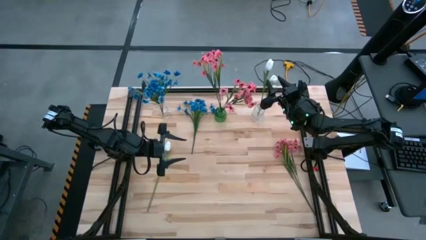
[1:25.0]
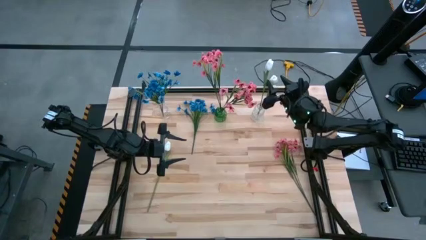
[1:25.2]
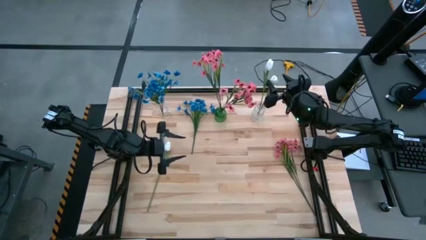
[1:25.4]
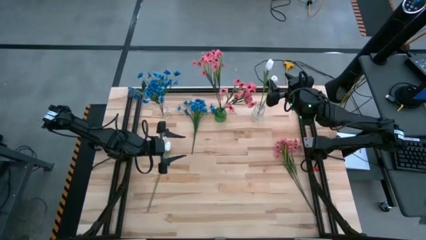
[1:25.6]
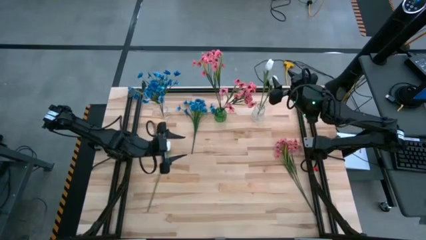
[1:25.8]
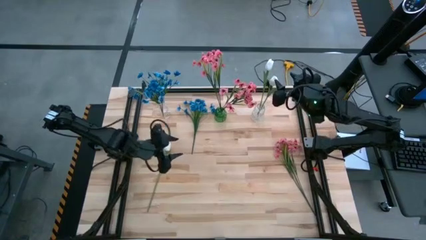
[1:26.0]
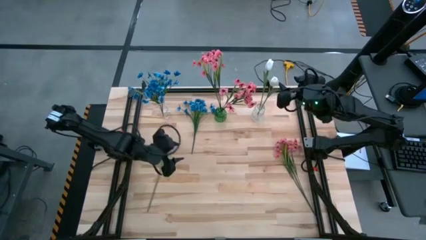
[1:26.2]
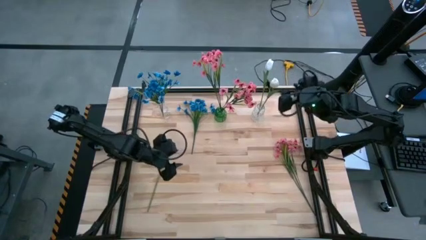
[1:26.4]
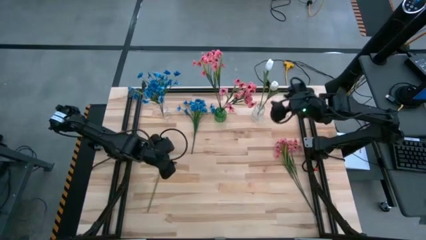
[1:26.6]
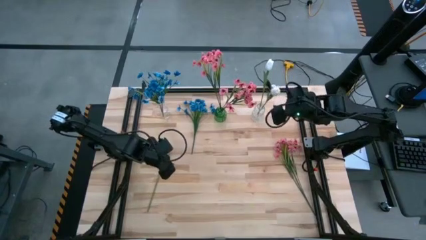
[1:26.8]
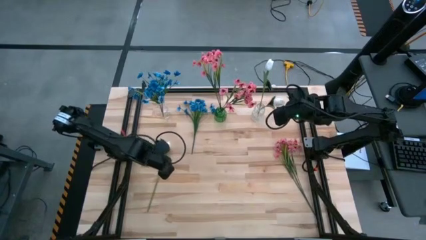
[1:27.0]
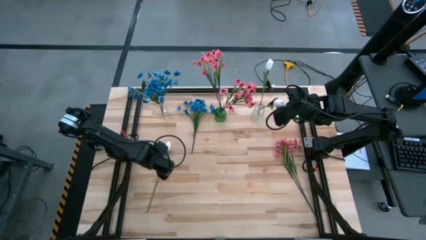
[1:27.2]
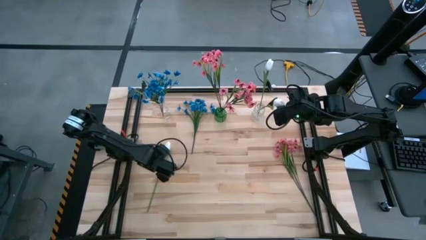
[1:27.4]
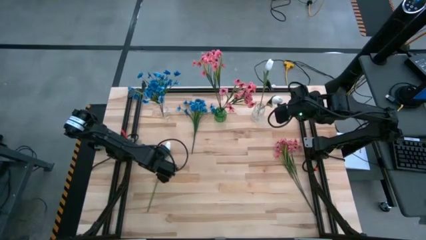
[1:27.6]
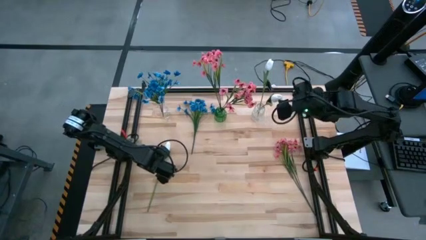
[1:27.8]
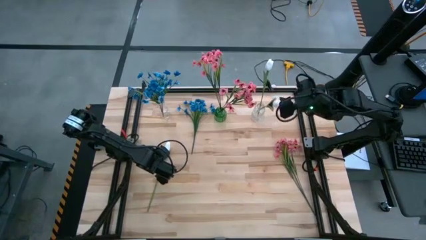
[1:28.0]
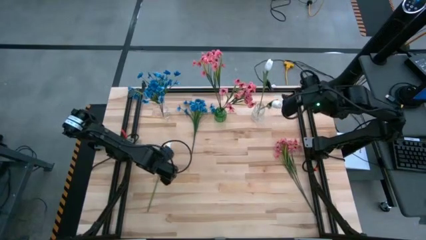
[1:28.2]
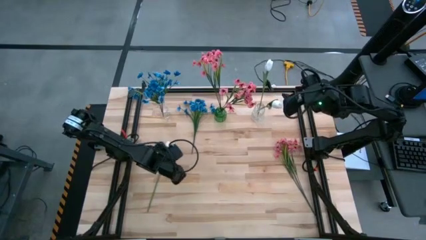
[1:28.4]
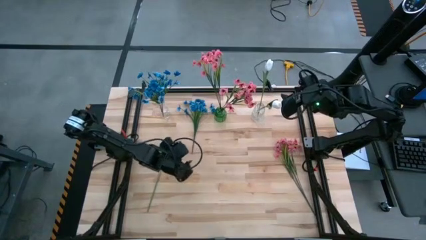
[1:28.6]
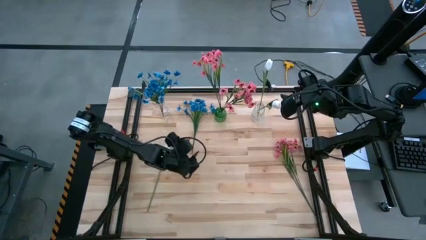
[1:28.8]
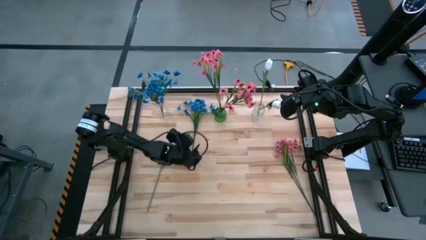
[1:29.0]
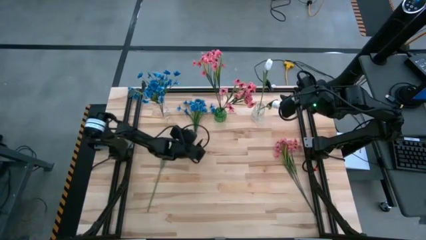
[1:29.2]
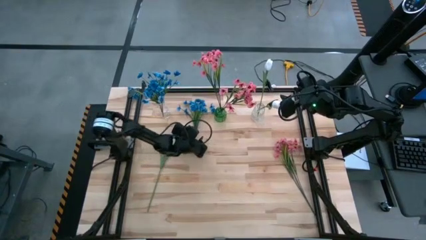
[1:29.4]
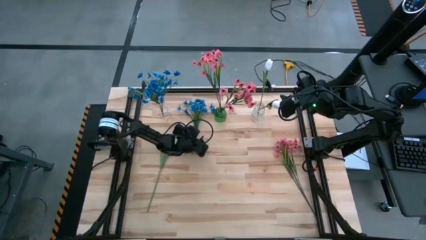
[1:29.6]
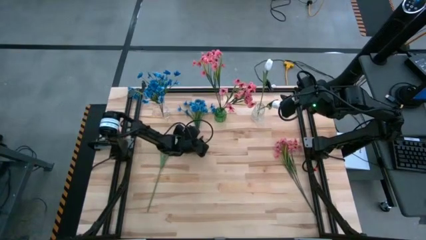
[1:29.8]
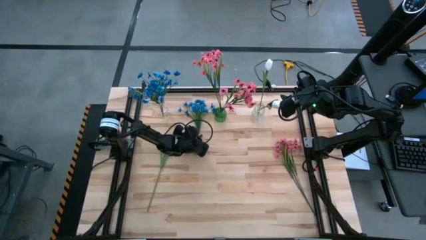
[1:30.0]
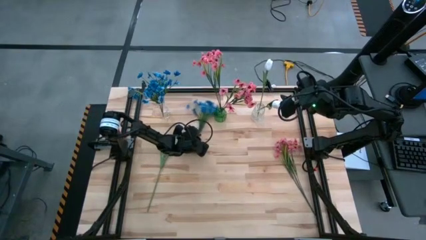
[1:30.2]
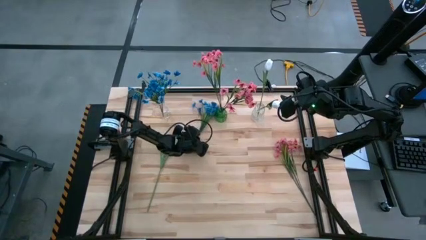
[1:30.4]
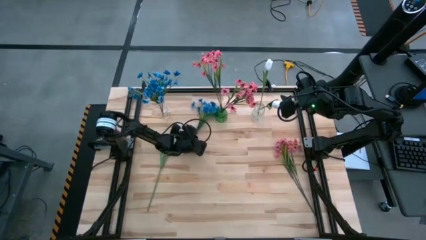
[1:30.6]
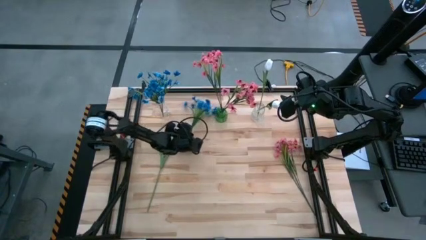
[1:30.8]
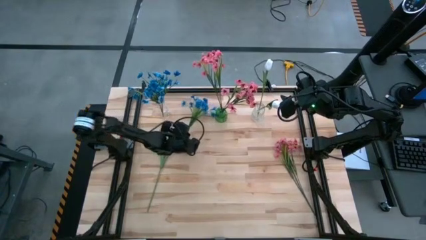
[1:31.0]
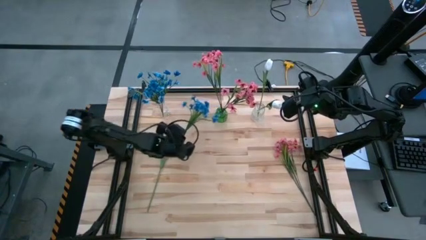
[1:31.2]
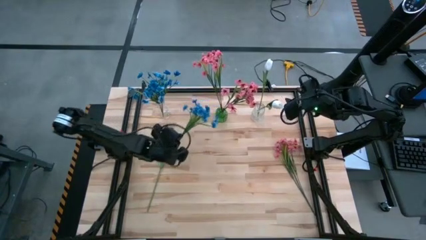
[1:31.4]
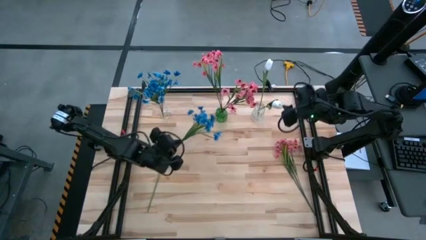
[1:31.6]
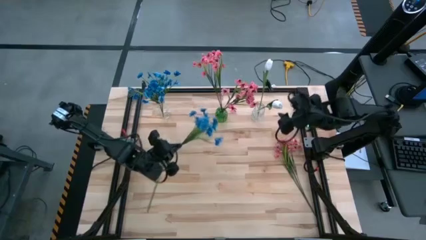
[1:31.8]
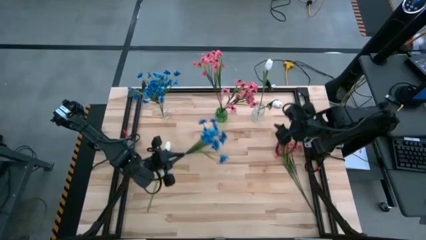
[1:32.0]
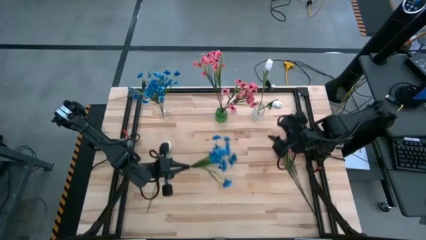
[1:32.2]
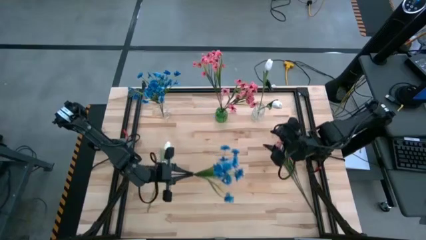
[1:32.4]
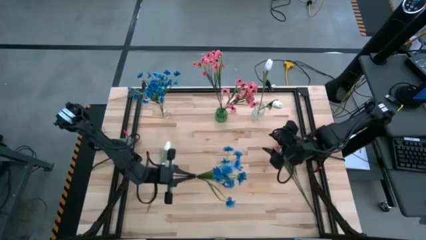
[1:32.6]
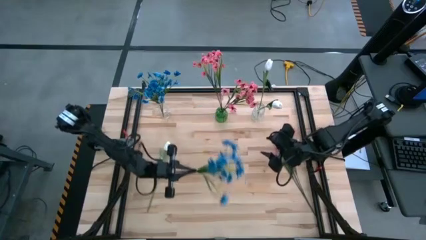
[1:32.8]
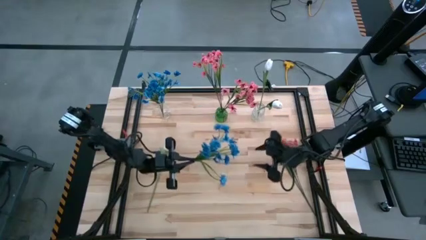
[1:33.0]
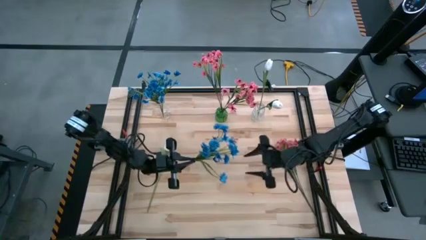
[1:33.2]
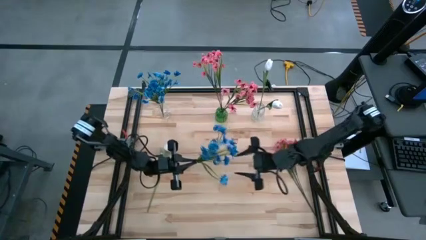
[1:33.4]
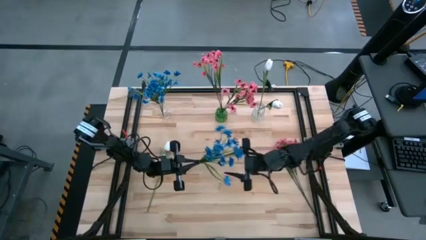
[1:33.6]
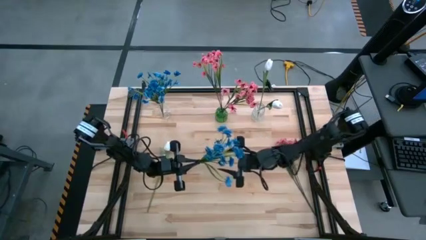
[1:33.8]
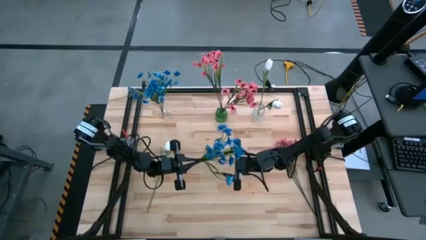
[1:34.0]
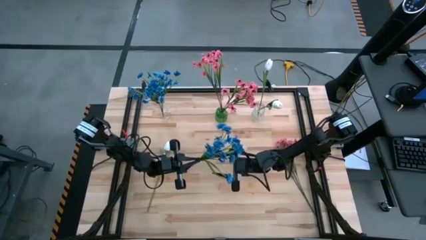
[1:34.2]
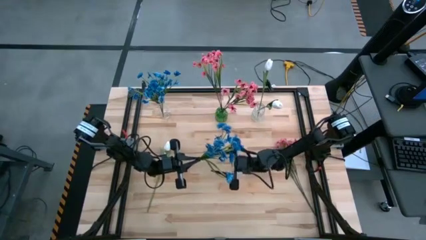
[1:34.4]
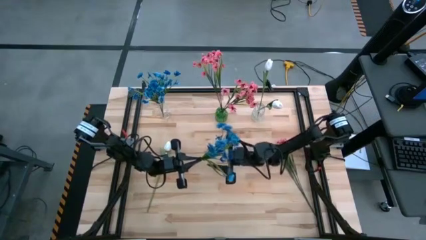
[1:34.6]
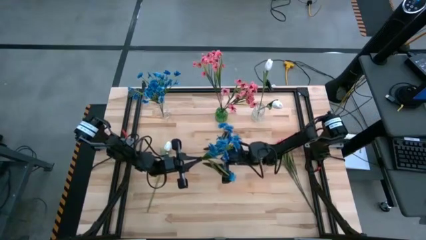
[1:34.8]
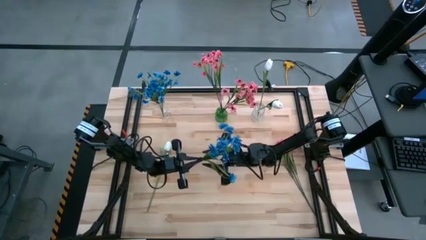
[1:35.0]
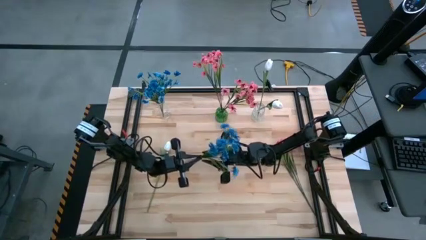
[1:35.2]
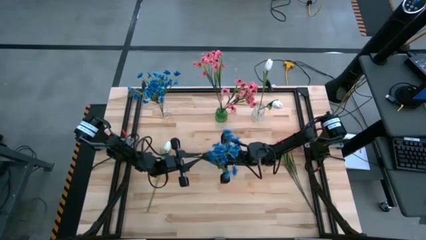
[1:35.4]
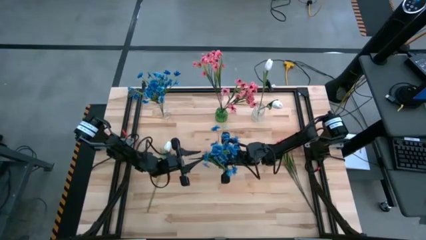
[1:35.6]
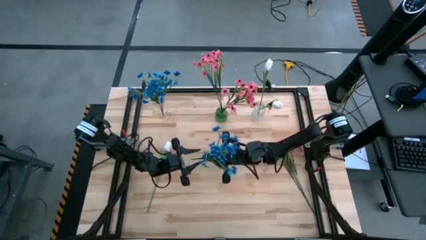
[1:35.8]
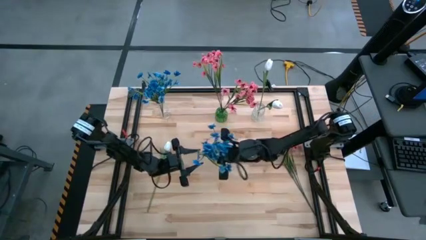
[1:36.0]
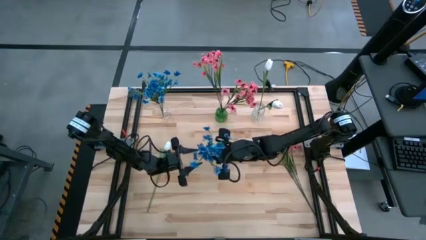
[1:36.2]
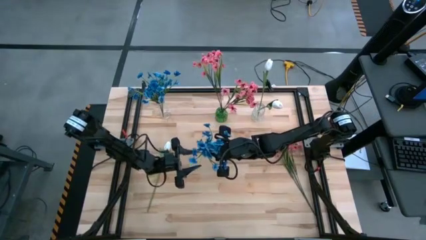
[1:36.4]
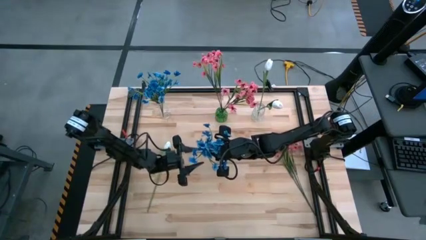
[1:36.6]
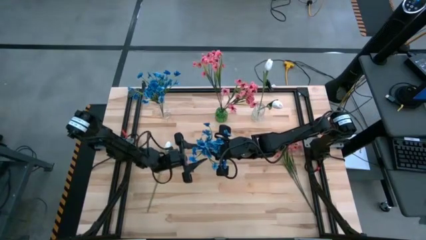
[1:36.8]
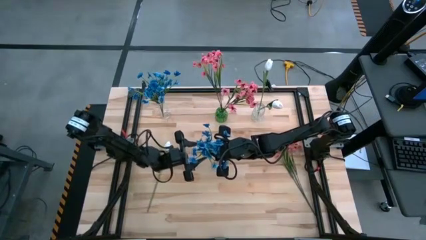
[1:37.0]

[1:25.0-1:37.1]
Task: Sort flowers into vase by color
Put the blue flowers into the left transparent vase
